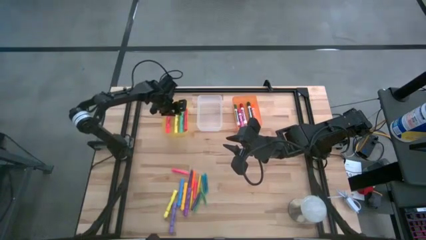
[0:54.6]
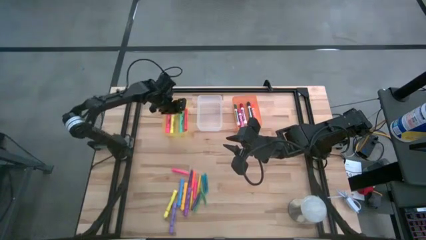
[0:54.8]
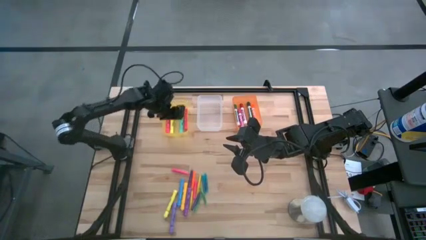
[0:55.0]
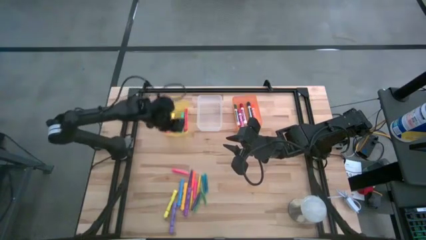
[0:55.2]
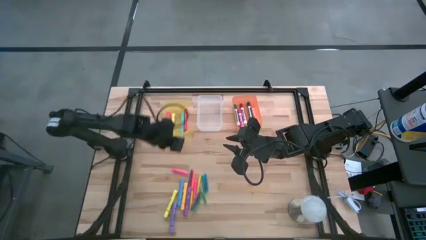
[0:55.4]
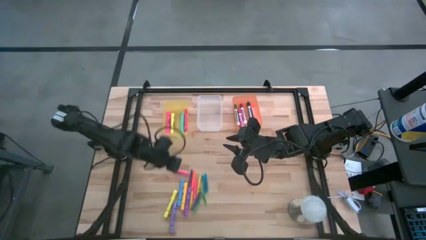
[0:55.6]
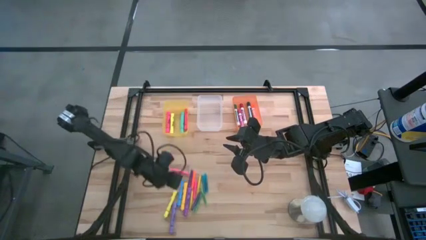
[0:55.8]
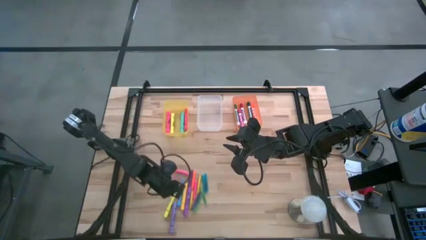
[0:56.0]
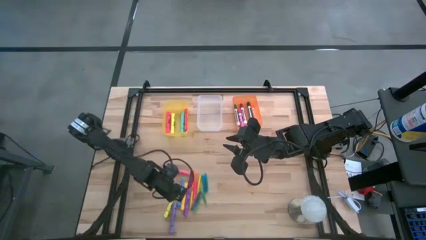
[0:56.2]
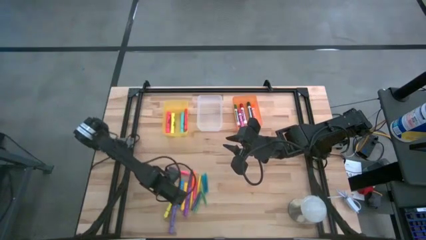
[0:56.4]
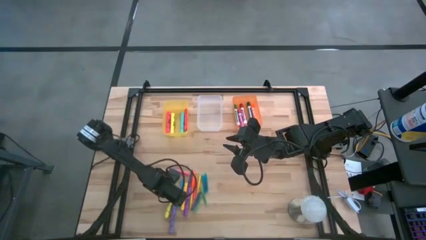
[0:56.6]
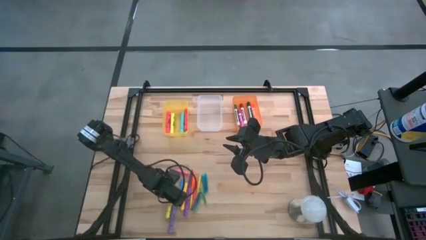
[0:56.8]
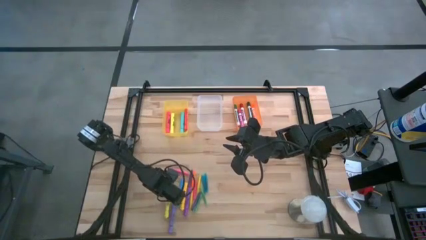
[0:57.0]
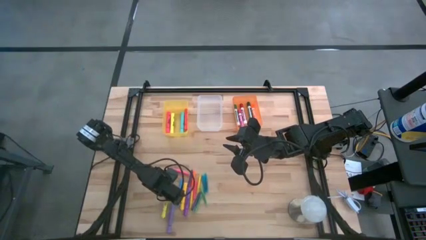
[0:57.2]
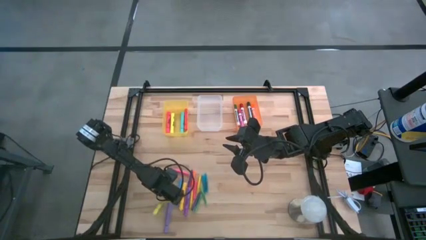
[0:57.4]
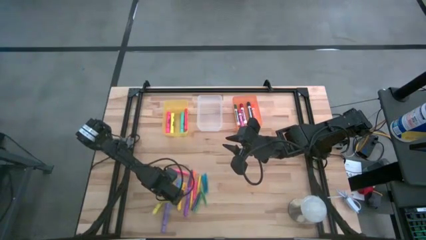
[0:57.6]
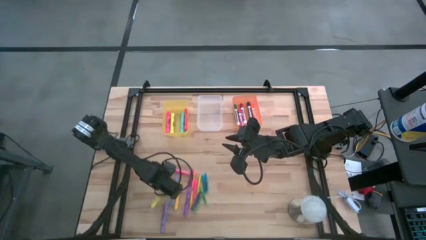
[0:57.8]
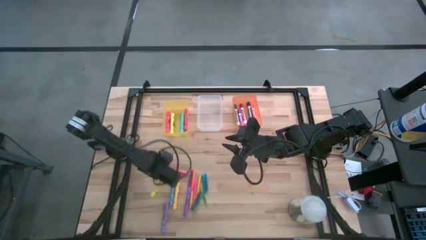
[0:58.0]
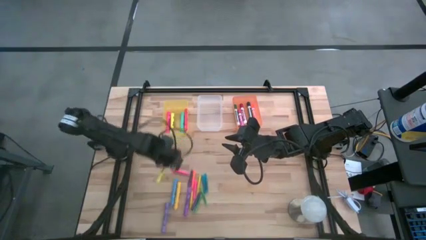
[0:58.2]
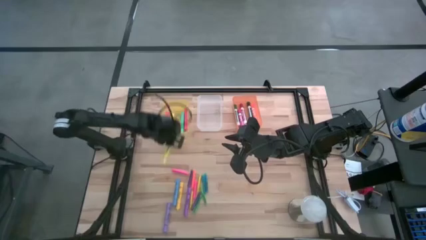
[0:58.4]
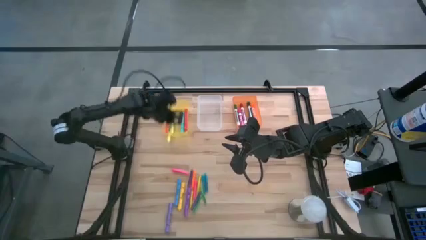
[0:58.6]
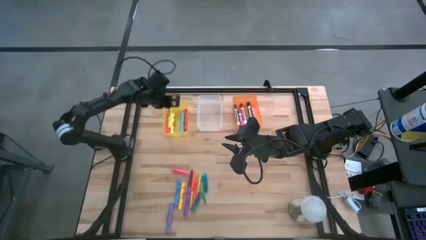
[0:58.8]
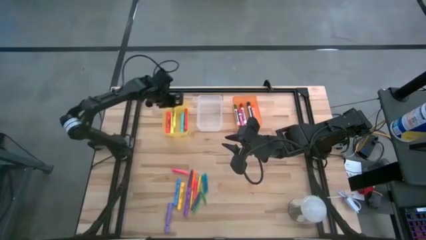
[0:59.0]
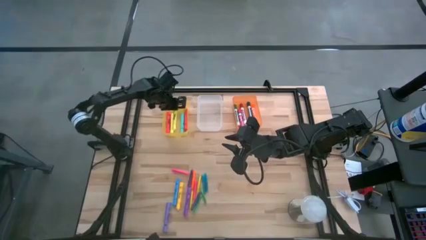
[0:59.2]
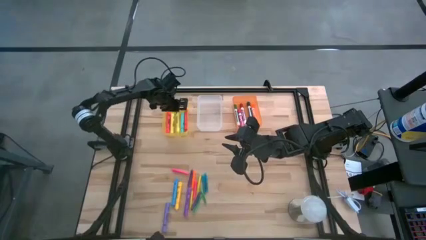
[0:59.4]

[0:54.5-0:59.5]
Task: Pick & Place Markers
Put the light yellow highlighter pen into the yellow bin

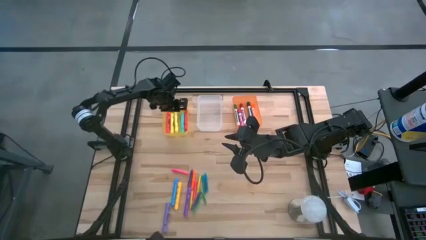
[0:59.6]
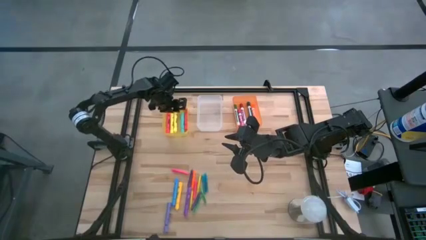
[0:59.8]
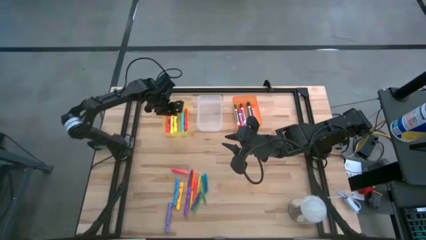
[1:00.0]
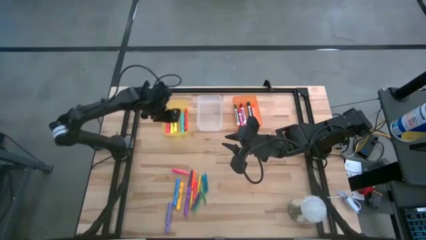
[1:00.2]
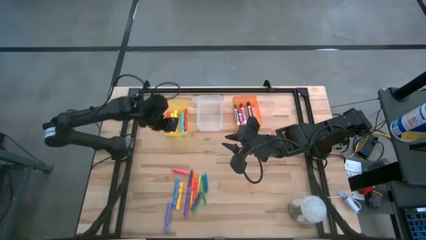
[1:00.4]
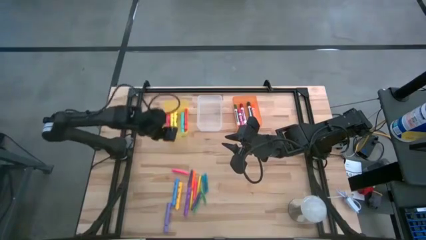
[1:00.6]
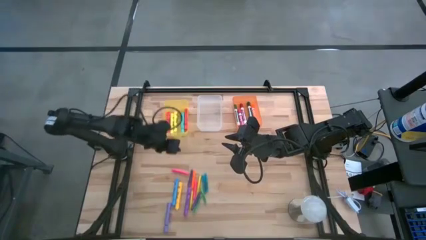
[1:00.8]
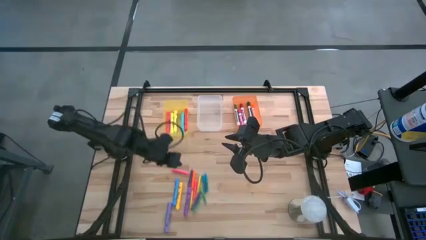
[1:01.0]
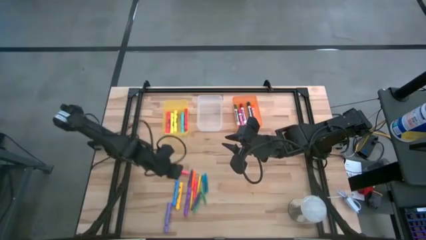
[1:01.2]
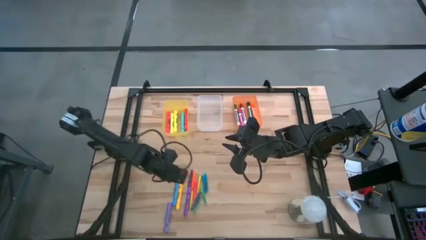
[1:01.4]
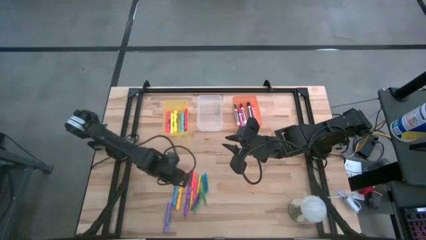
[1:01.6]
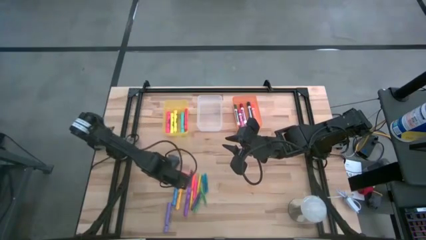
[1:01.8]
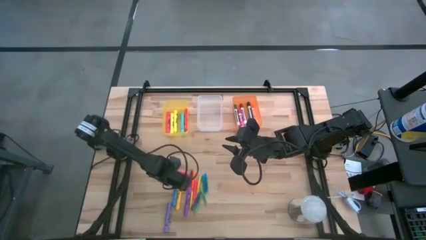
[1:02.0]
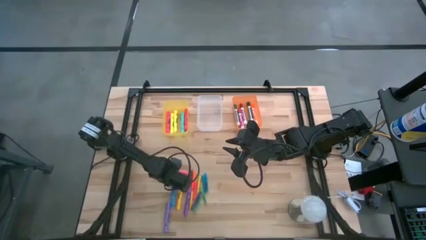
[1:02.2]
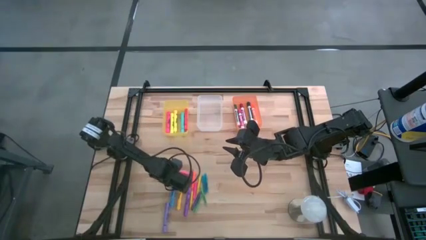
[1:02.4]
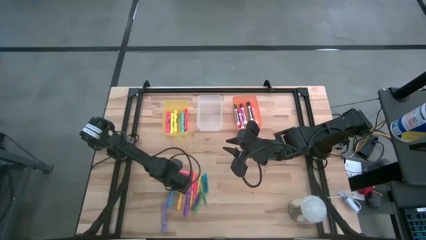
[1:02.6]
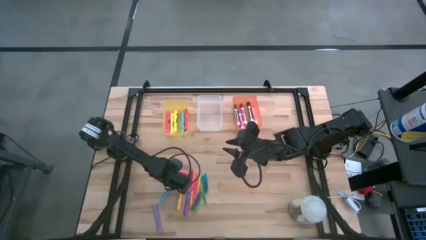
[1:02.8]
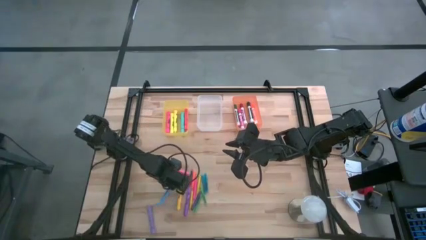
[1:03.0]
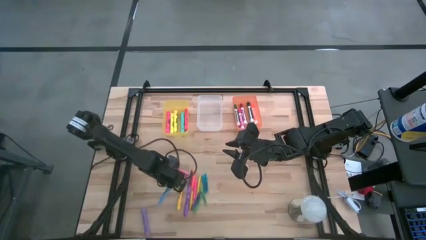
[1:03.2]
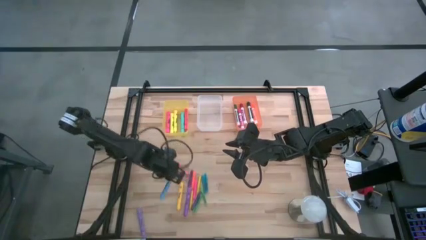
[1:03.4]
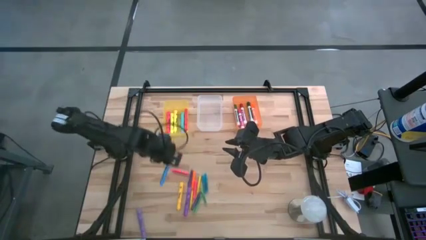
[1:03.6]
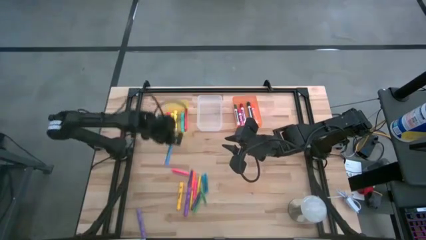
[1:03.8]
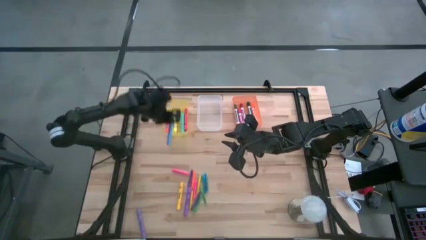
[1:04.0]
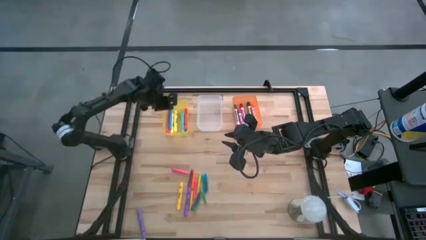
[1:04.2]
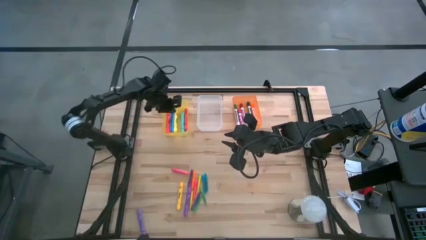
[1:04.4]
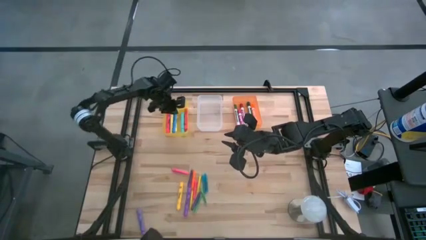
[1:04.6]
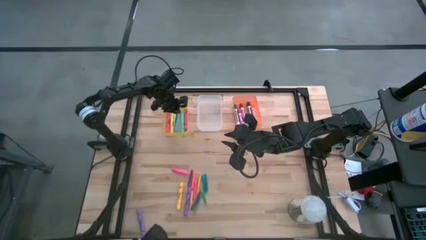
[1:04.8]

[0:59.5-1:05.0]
Put the blue highlighter pen into the yellow bin

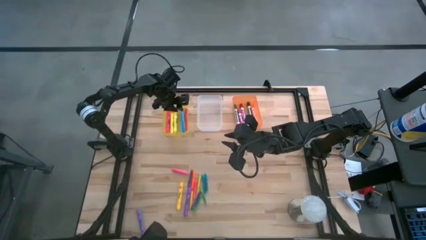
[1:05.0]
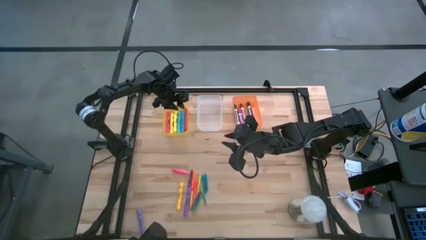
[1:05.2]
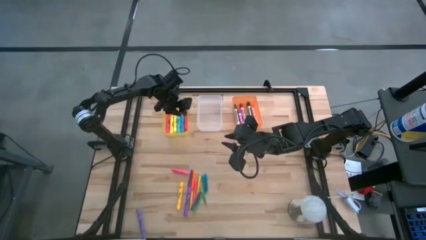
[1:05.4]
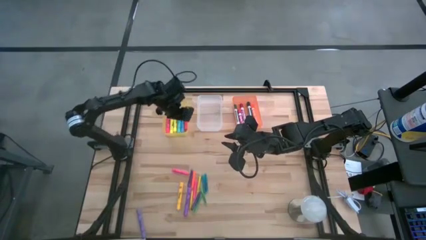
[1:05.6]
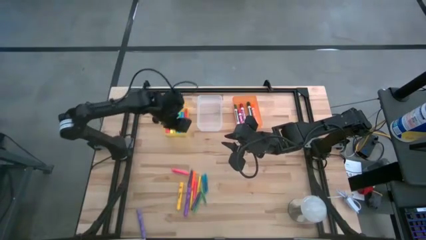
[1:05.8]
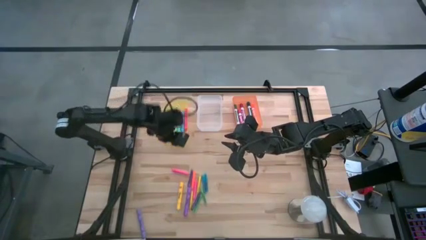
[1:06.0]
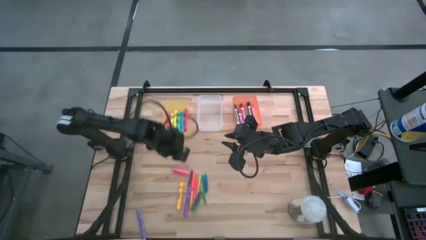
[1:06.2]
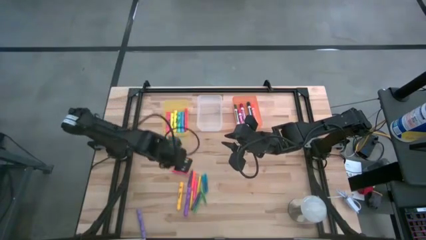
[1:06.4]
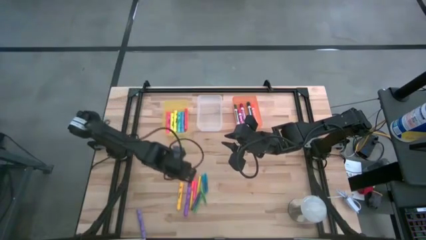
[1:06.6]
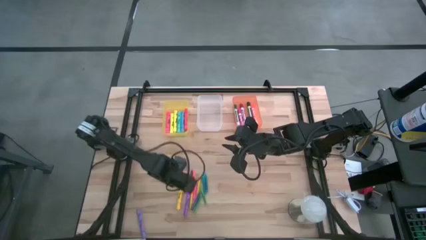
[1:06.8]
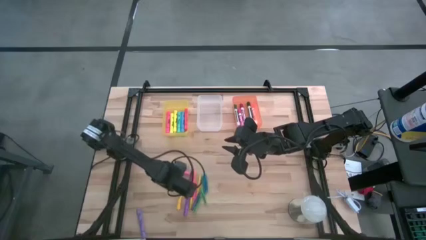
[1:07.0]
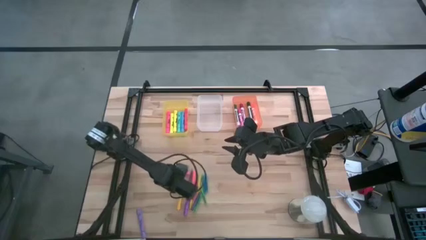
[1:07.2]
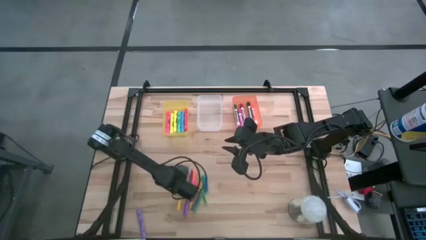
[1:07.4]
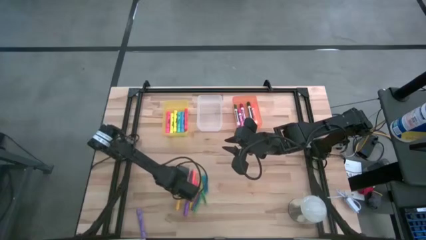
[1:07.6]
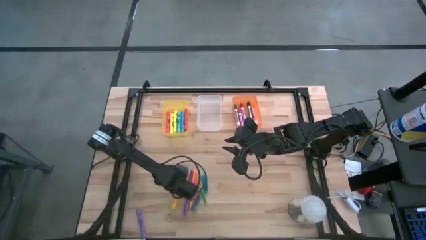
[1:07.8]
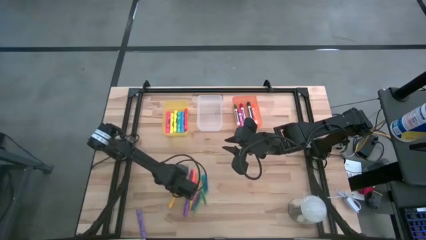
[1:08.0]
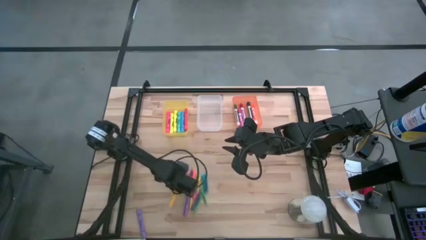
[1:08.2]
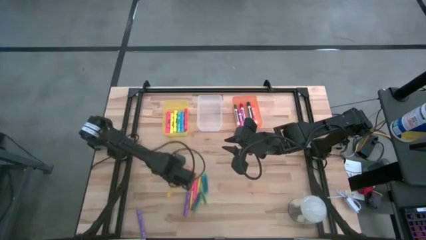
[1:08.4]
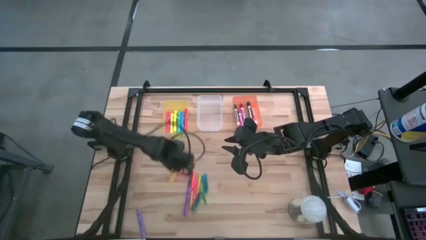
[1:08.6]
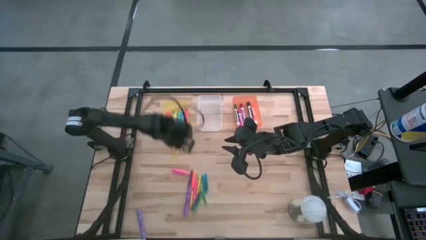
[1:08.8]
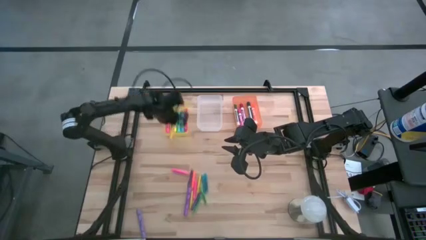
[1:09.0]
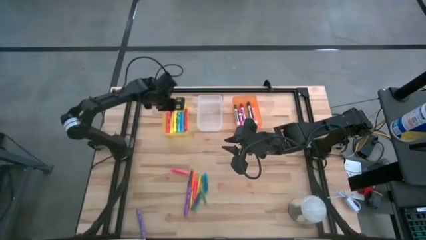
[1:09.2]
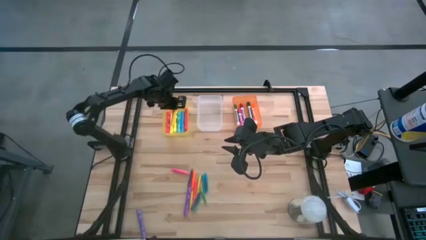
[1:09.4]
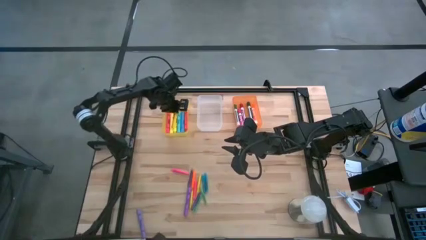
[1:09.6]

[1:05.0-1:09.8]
Put the dark yellow highlighter pen into the yellow bin

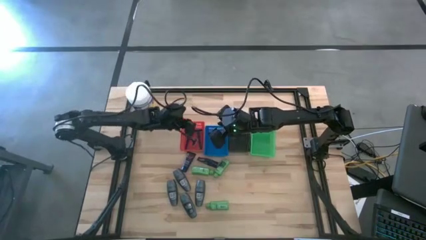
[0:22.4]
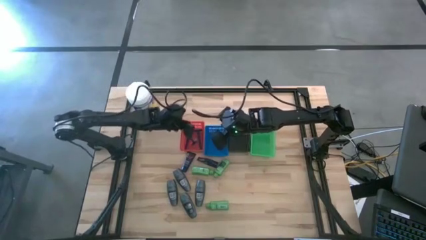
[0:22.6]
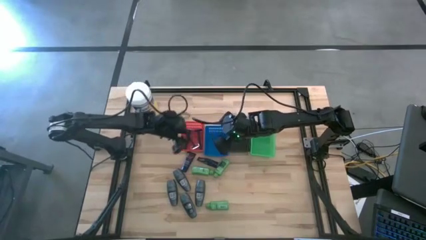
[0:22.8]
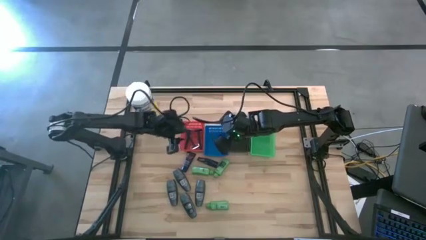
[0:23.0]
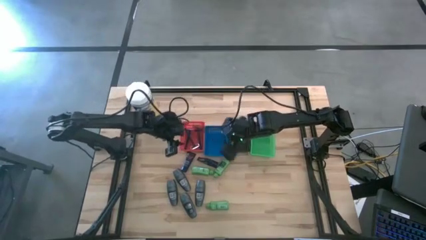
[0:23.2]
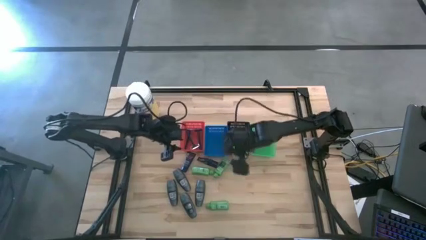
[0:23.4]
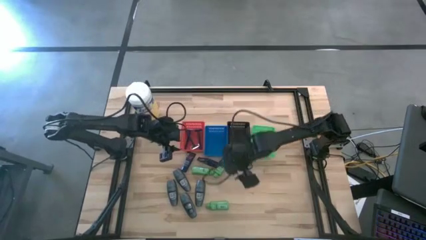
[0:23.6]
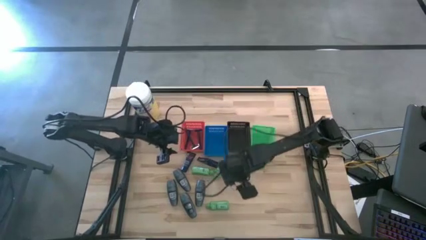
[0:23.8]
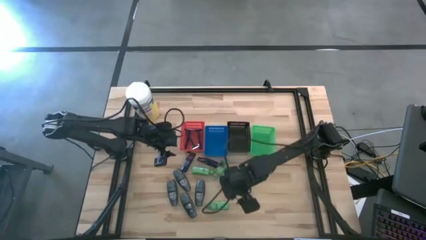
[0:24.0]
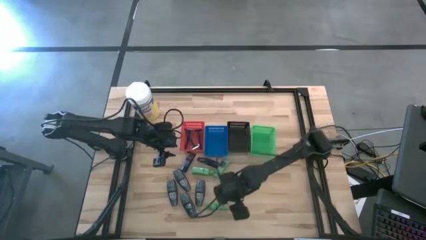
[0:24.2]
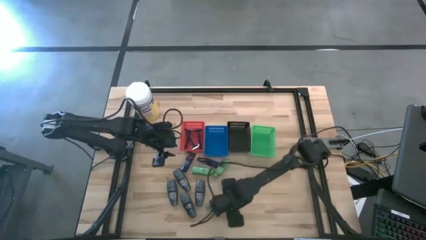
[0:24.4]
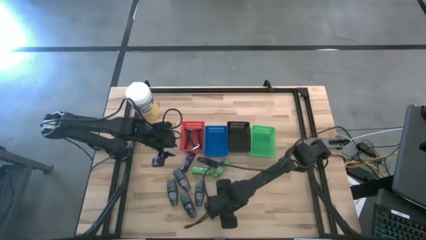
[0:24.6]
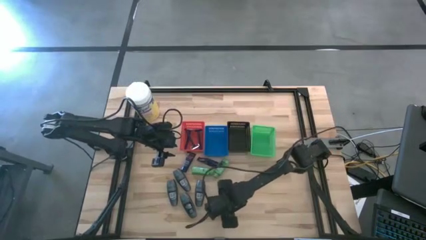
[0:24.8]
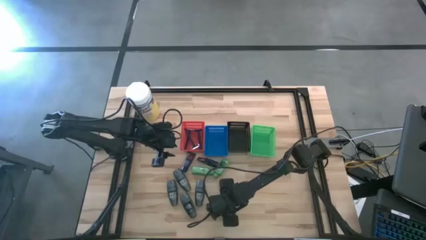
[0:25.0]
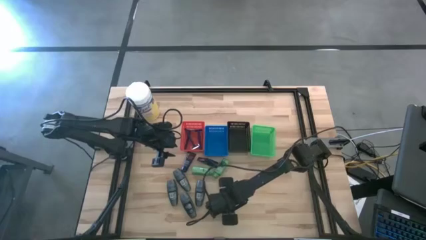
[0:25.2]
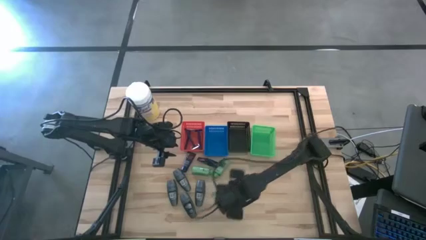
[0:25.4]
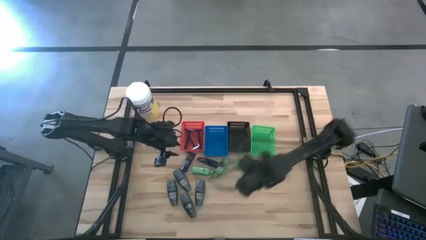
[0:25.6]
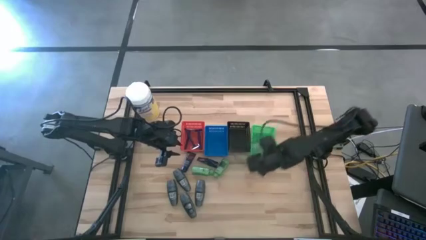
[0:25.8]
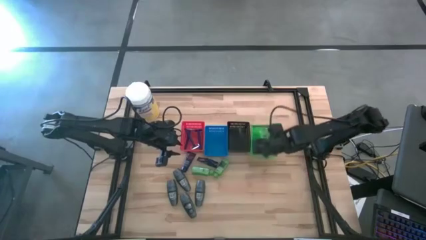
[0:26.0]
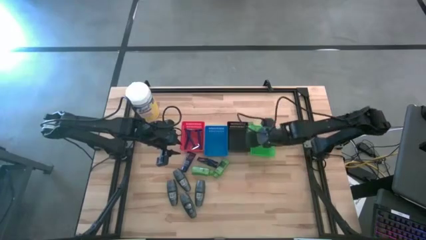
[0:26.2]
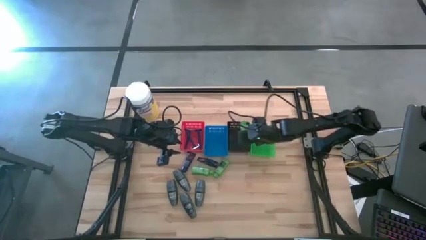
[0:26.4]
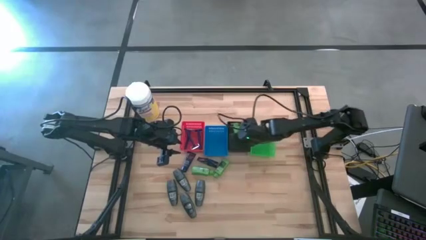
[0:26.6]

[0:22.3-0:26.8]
Task: Pick & Place Travel size toiletries
Put the shampoo into the black basket
